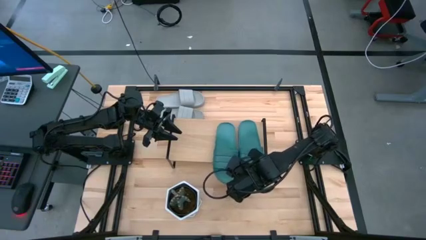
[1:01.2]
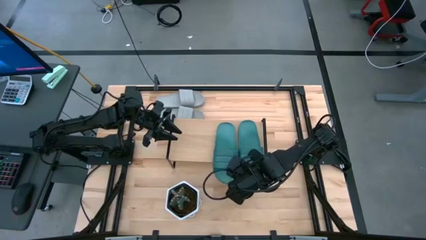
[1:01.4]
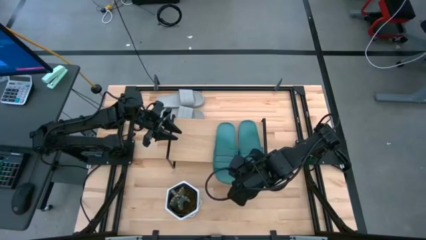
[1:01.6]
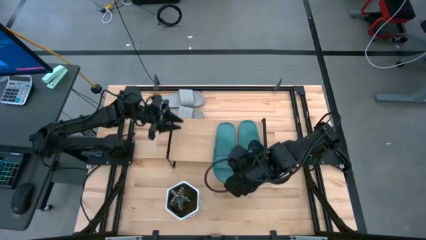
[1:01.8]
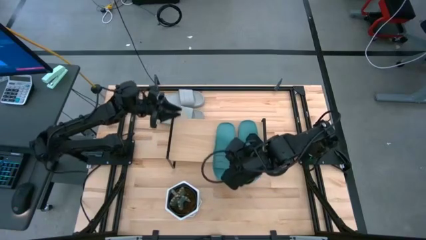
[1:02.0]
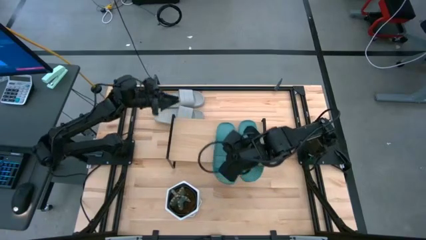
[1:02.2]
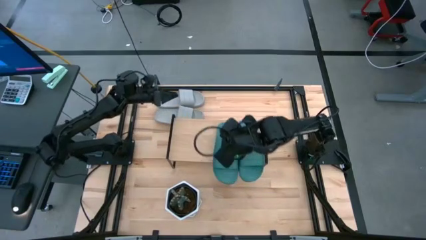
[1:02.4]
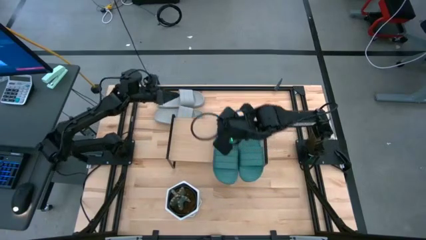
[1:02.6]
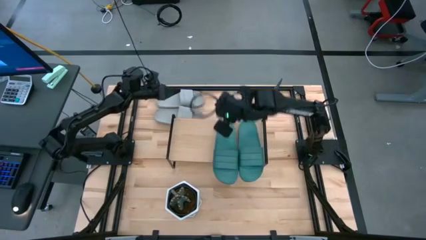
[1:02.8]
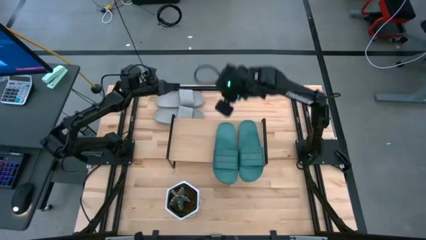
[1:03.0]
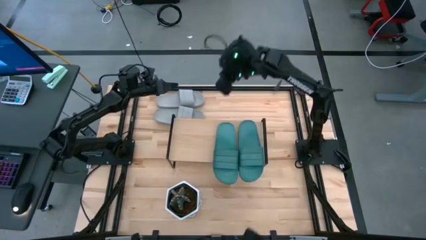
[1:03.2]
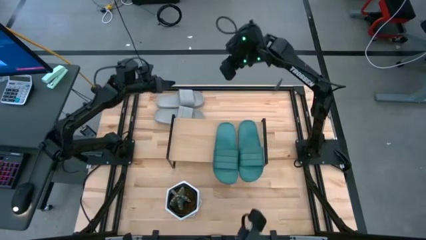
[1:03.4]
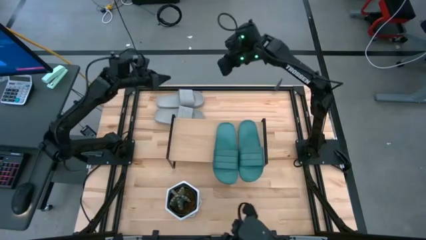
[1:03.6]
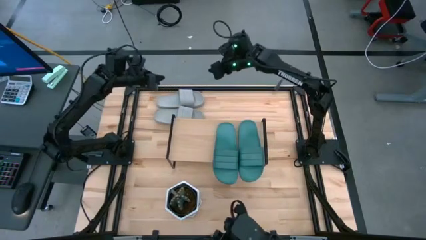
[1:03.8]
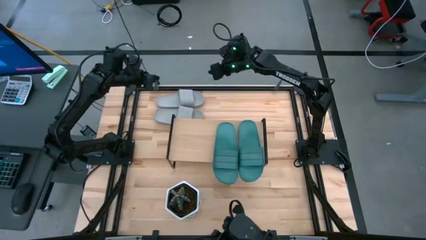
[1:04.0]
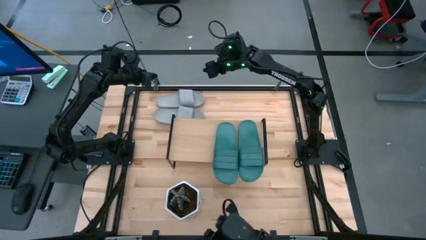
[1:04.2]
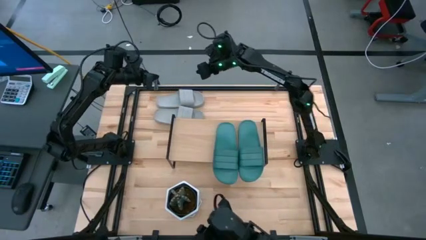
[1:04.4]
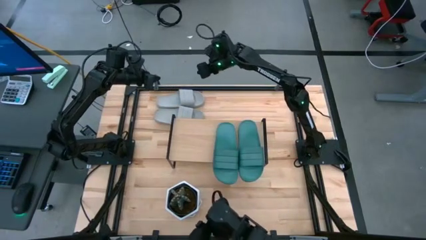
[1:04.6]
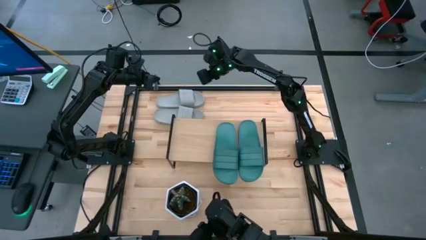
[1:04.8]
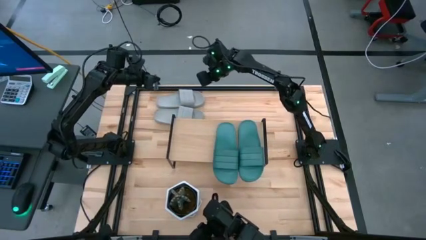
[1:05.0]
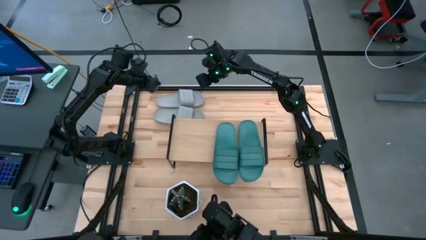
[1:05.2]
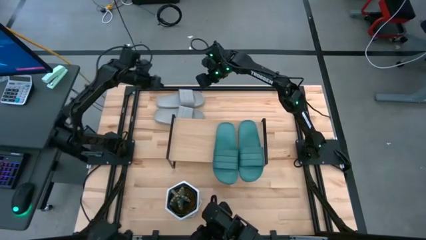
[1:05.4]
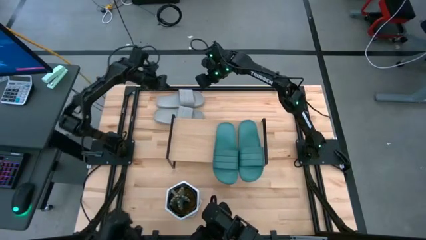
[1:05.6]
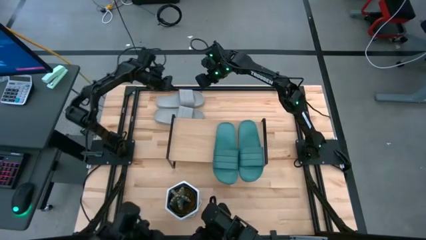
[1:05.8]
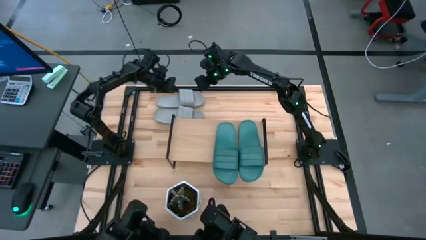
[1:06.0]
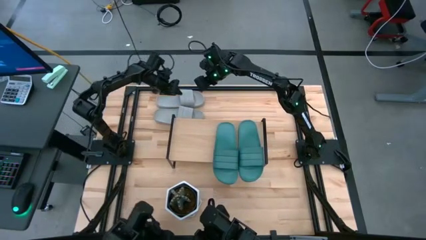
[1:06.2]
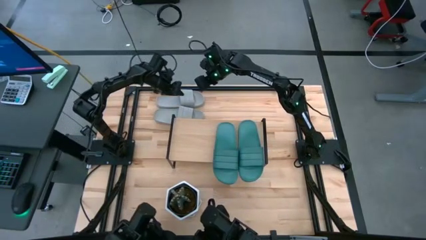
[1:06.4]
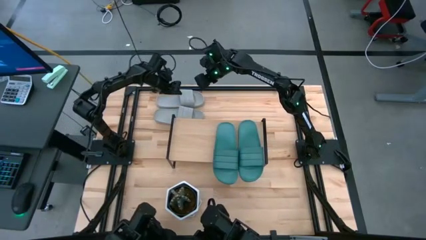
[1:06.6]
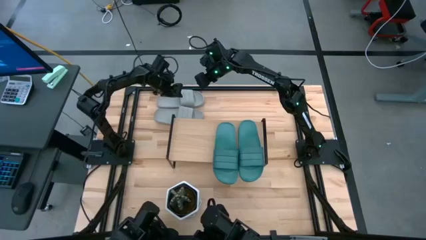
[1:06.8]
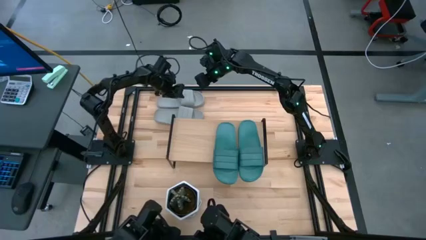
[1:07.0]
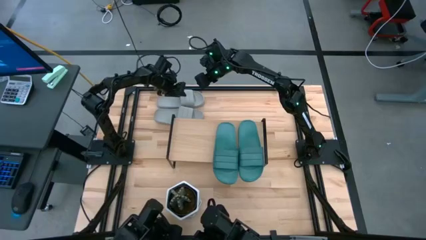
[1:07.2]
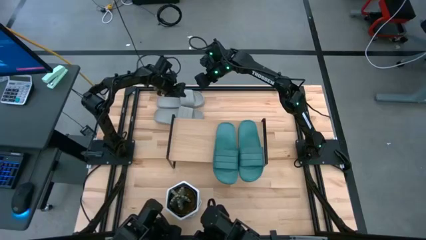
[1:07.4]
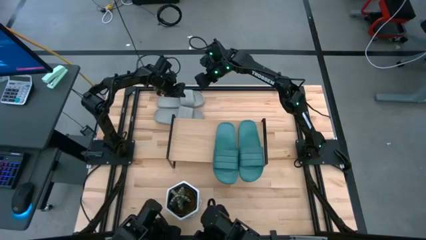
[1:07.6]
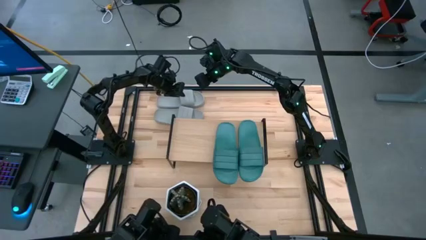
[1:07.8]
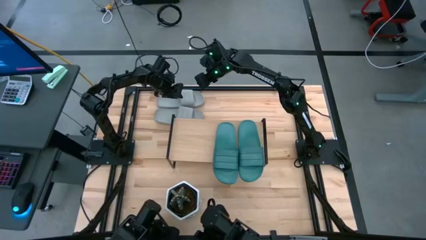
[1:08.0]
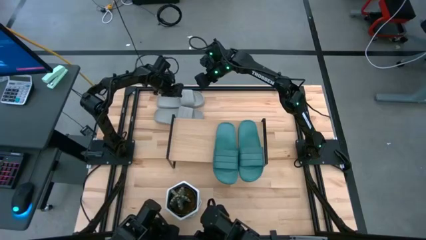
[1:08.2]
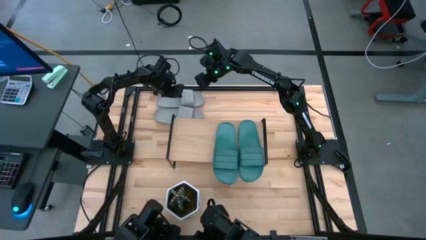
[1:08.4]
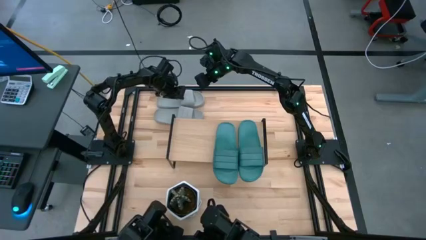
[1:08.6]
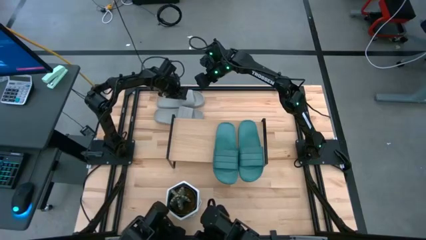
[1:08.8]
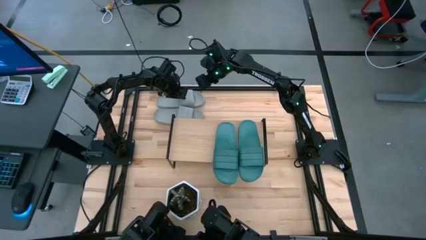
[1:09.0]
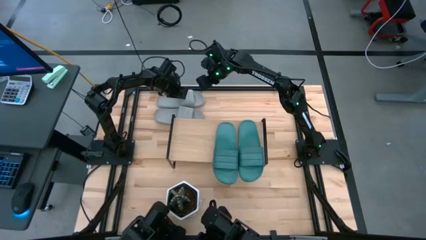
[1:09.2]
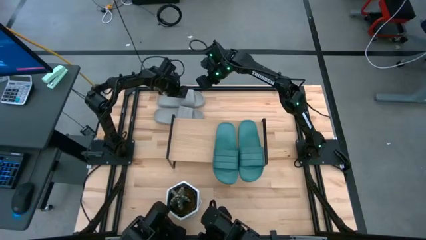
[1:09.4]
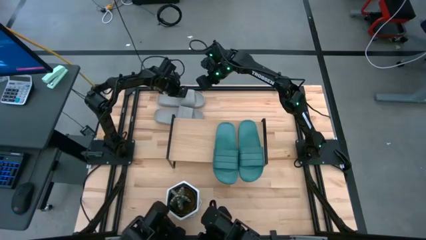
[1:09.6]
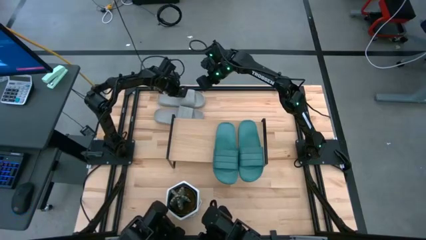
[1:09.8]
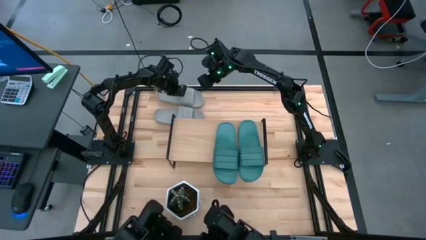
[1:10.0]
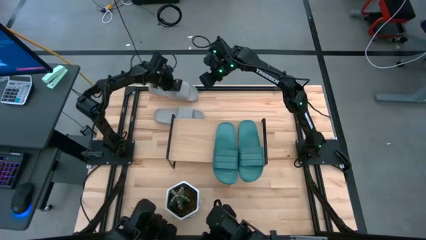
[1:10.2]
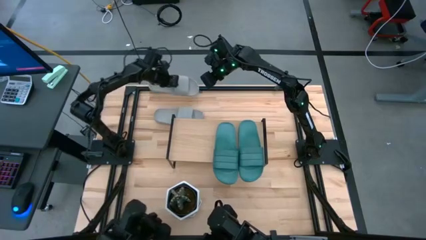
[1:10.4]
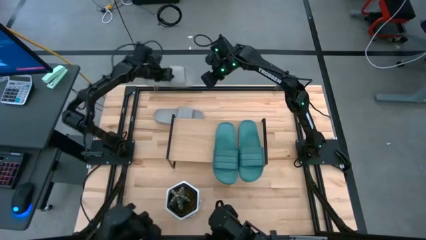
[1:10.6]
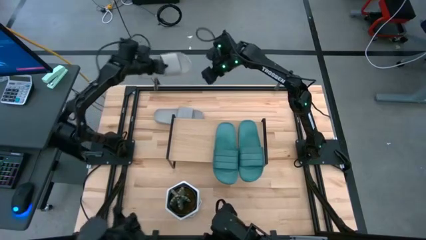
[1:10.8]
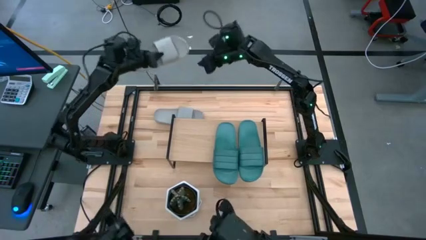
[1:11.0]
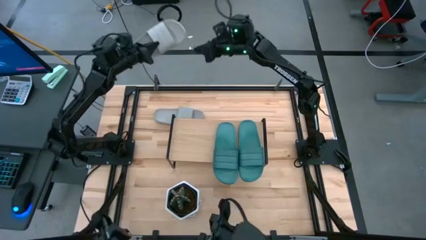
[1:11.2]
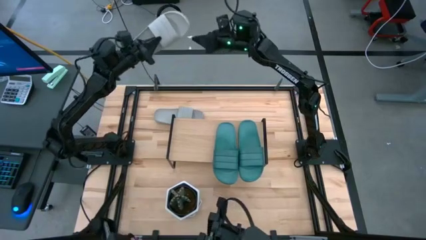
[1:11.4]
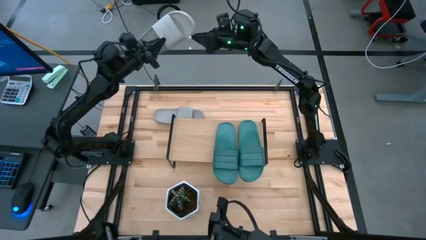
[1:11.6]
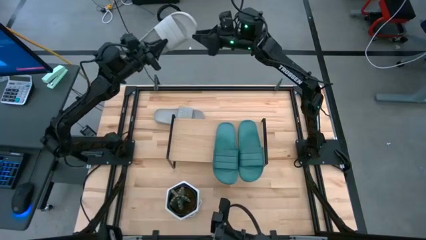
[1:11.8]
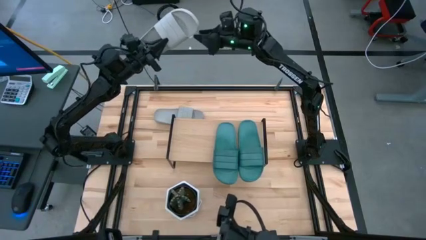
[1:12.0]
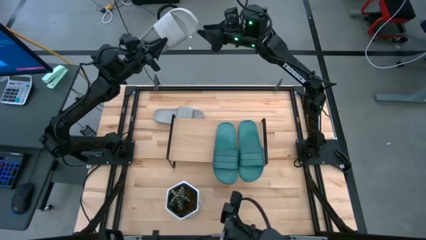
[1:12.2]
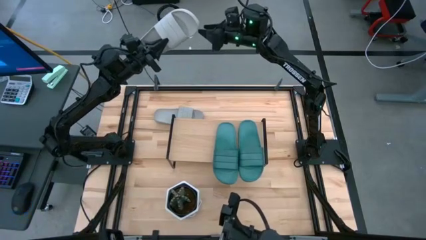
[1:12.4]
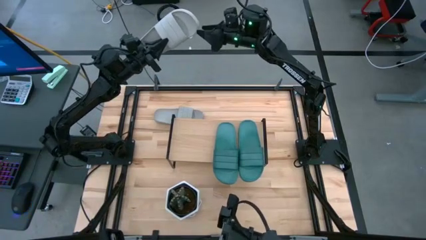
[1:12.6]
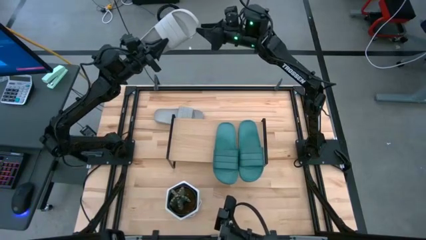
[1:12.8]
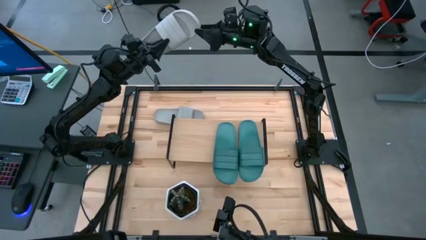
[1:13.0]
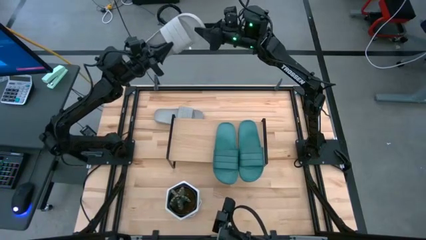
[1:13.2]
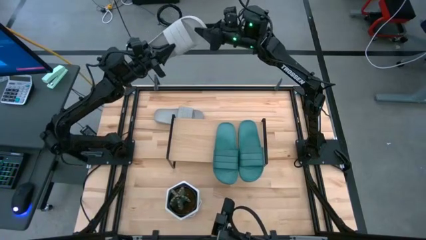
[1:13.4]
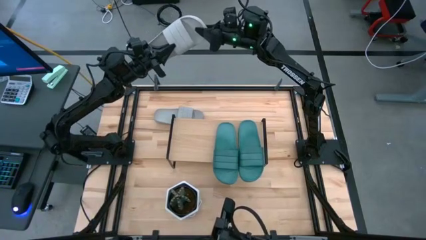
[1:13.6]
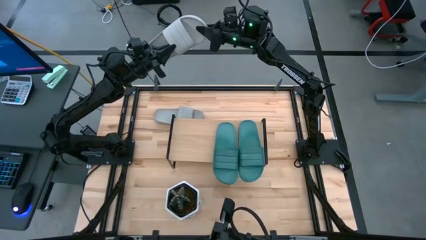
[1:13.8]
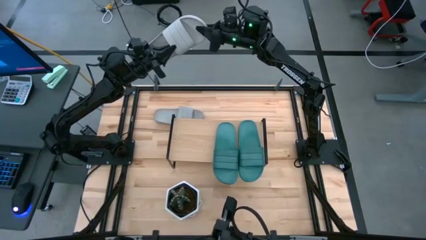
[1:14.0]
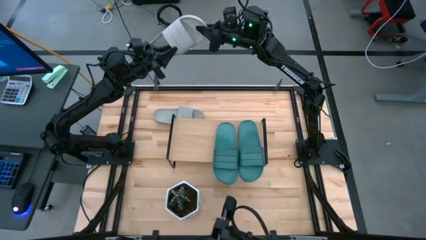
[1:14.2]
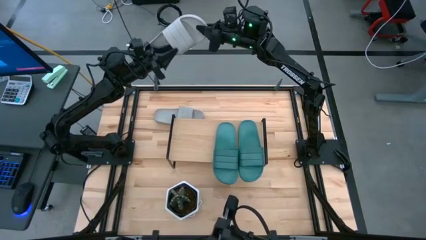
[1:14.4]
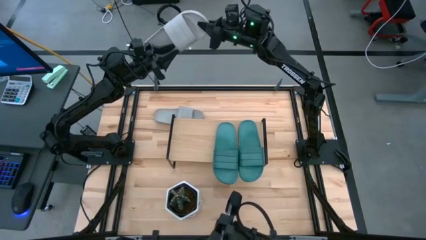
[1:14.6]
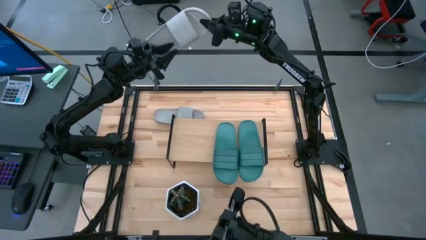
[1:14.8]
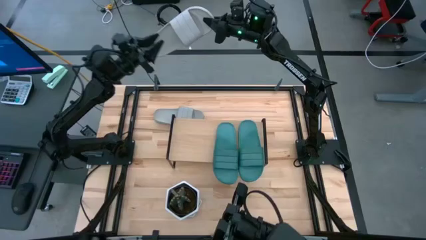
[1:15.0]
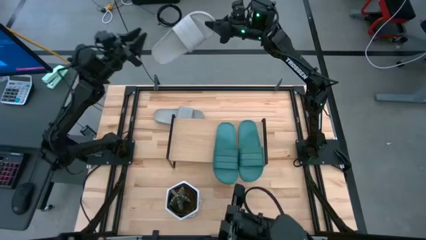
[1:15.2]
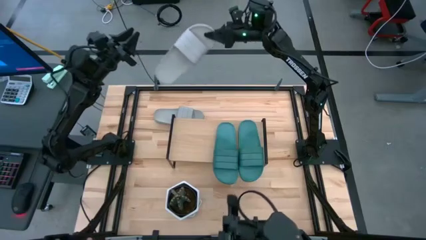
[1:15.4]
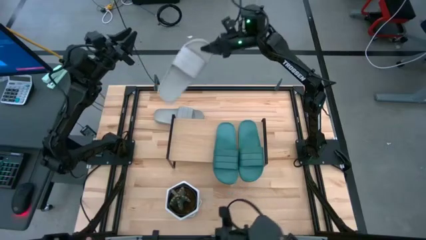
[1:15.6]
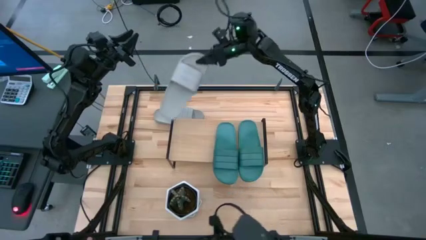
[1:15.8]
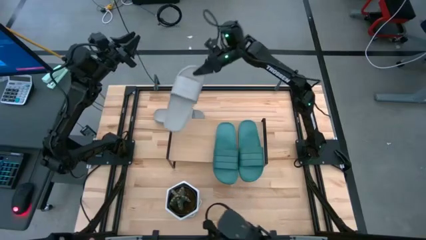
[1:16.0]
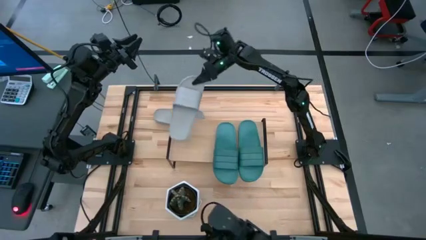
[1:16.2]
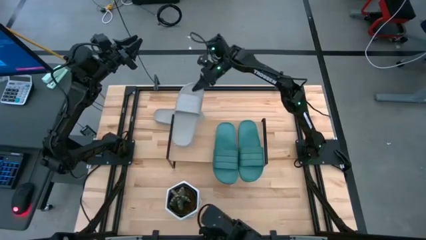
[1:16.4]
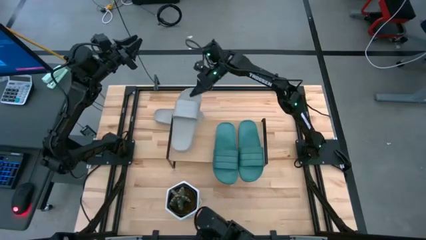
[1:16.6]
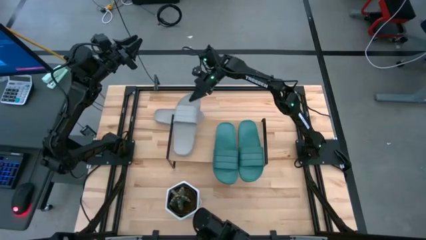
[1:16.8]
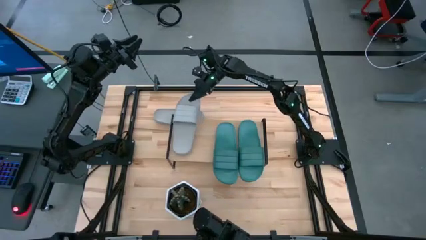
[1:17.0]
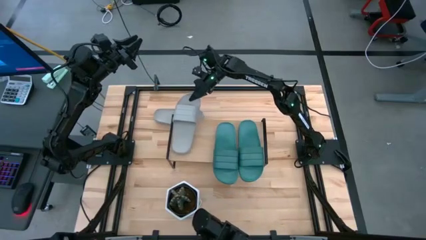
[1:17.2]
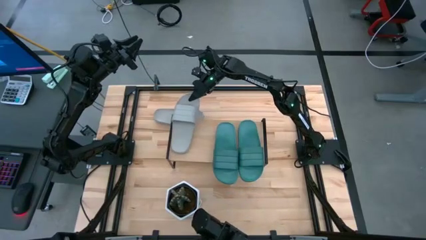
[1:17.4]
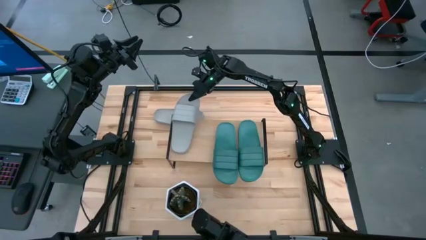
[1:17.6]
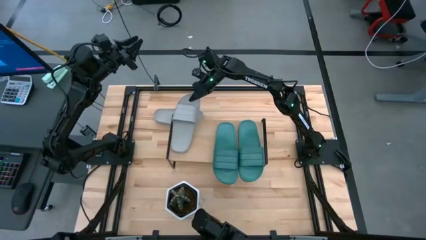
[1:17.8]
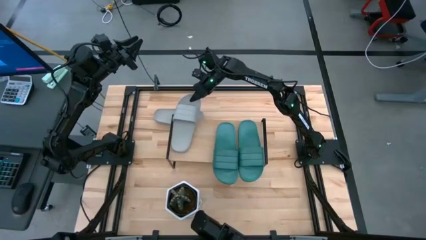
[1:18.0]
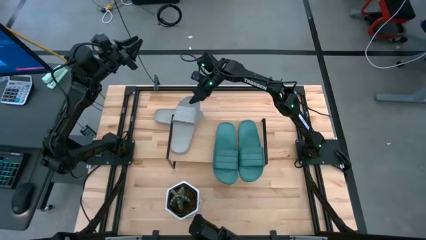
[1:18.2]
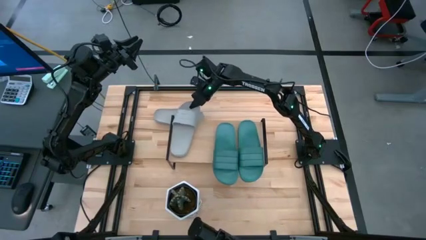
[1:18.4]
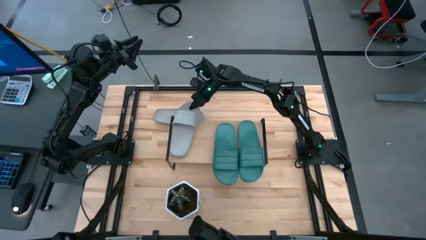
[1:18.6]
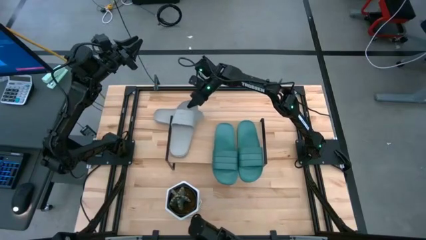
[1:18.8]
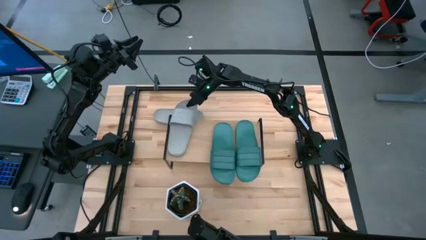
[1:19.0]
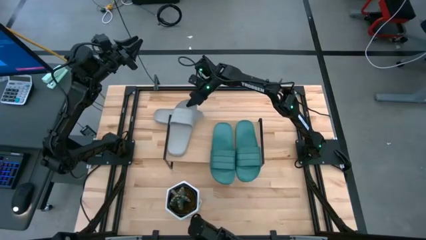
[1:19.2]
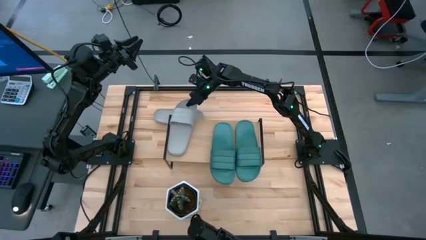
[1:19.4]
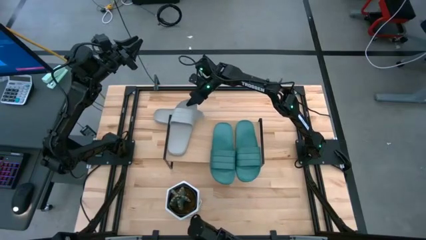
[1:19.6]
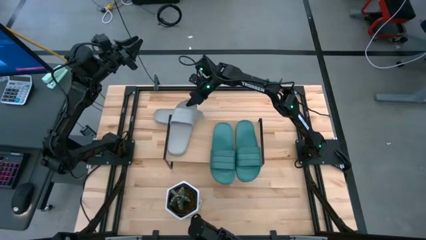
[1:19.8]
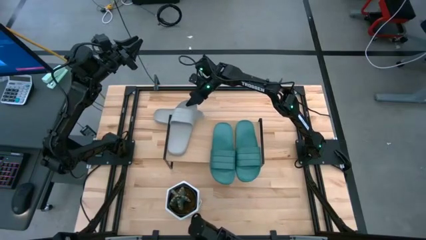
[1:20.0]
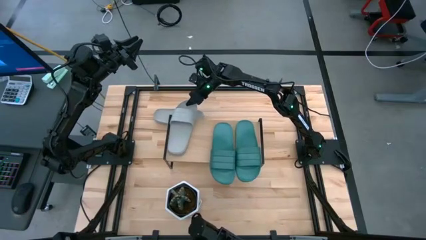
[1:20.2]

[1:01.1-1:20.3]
Task: Pick and place slides into the shelf
Put the top gray slide on the shelf
